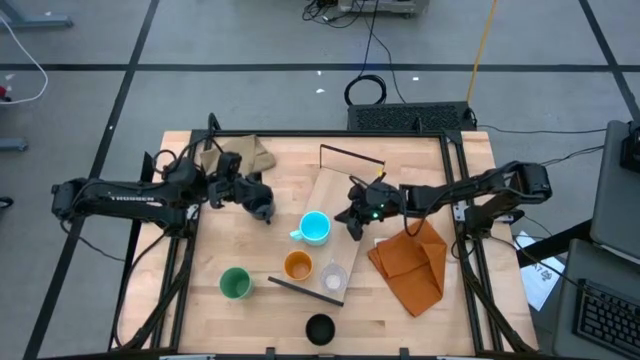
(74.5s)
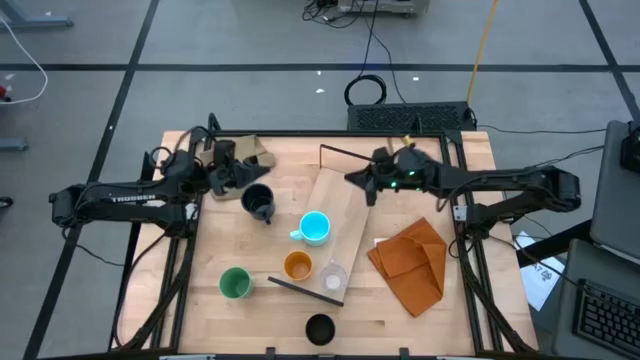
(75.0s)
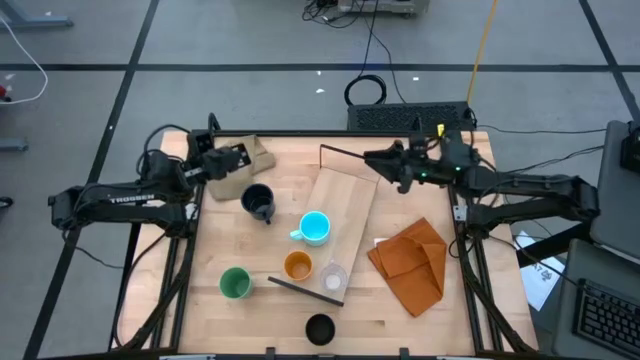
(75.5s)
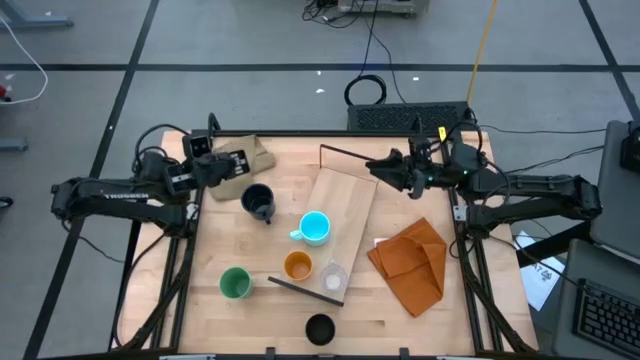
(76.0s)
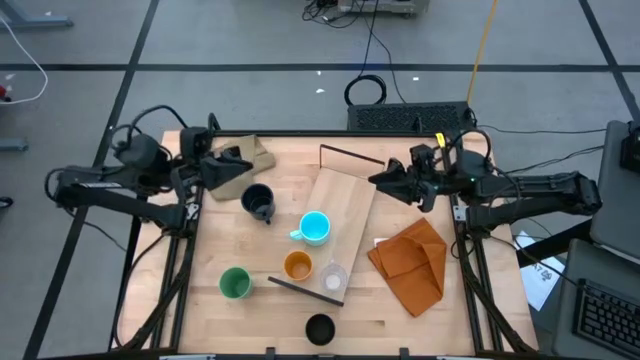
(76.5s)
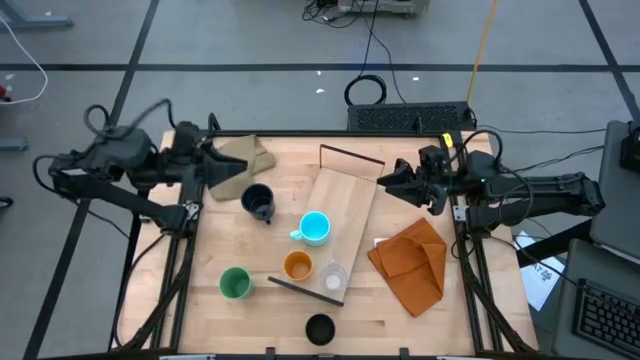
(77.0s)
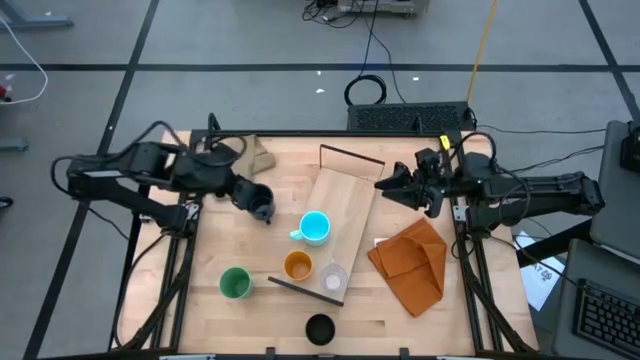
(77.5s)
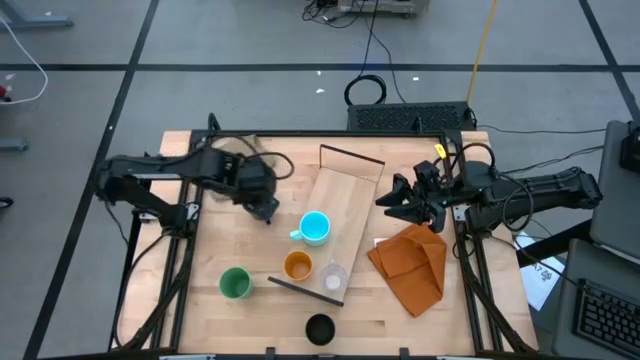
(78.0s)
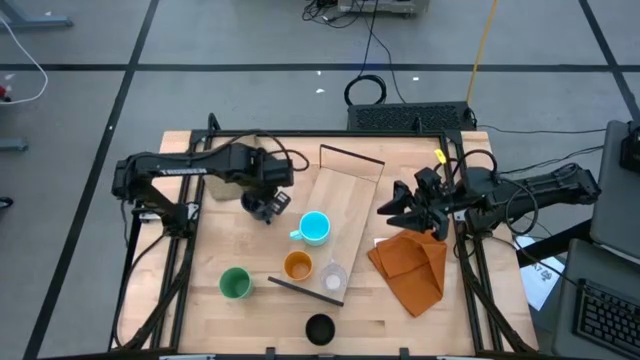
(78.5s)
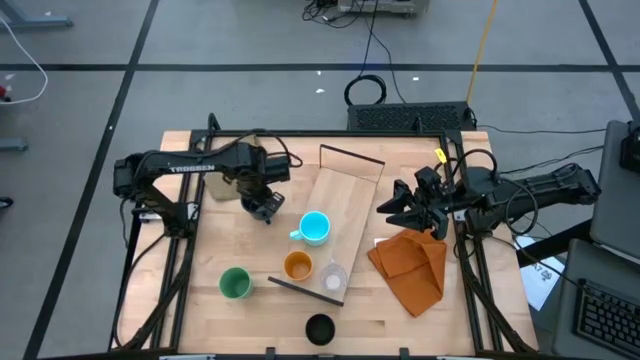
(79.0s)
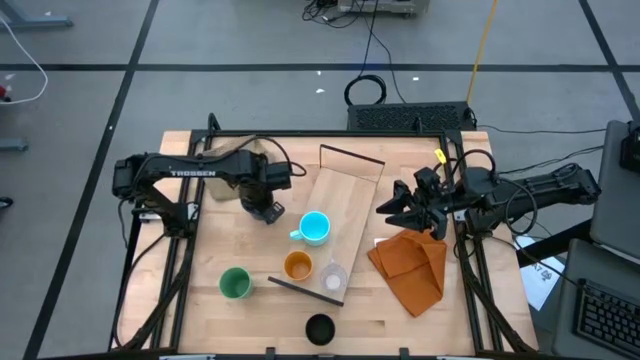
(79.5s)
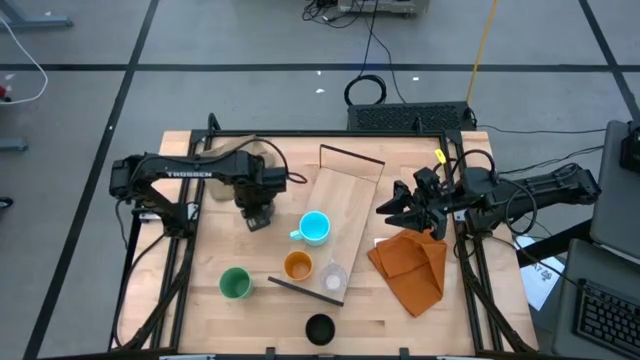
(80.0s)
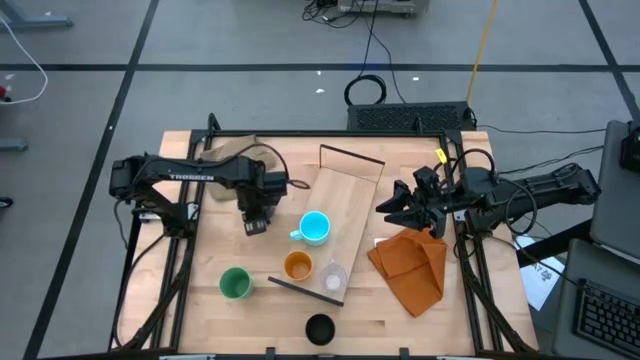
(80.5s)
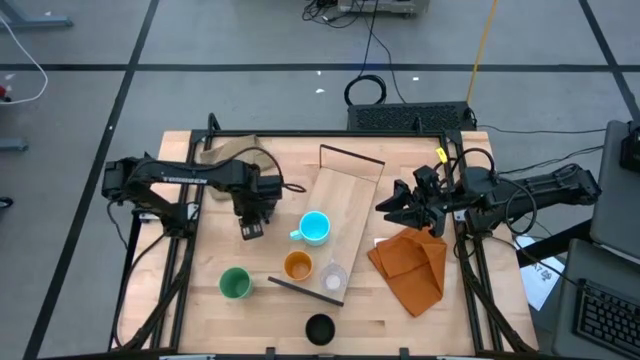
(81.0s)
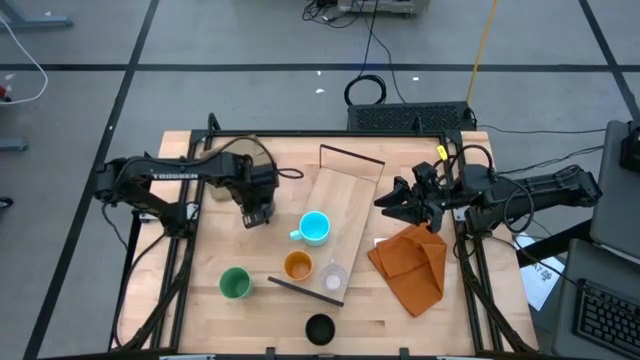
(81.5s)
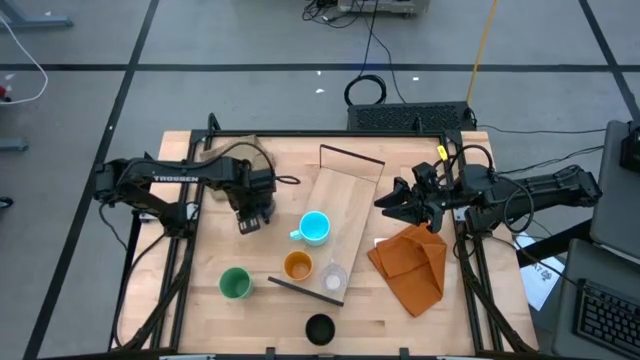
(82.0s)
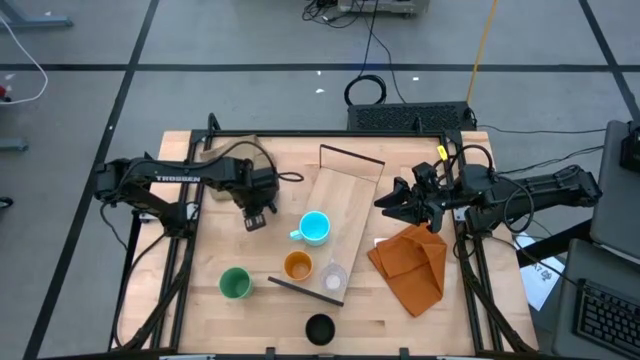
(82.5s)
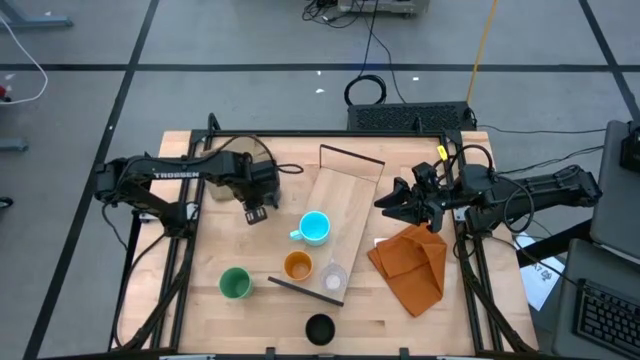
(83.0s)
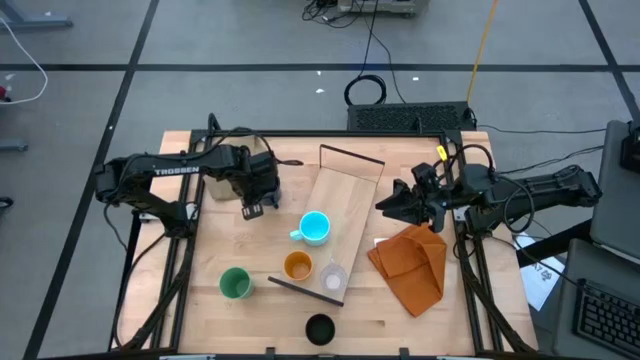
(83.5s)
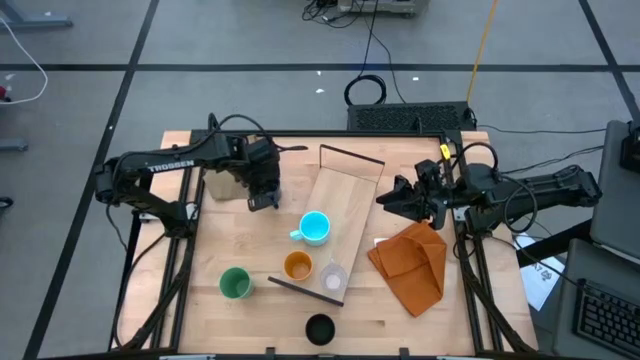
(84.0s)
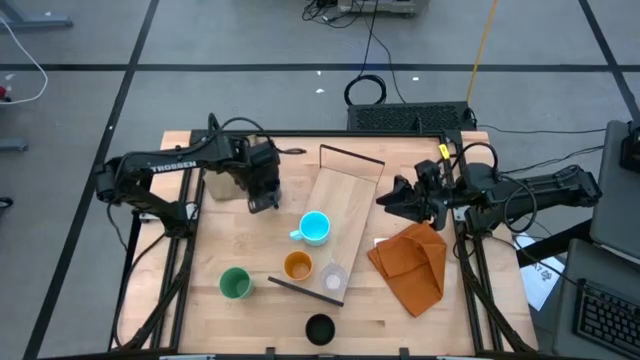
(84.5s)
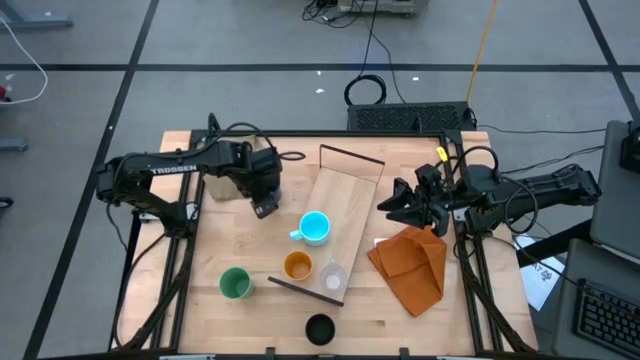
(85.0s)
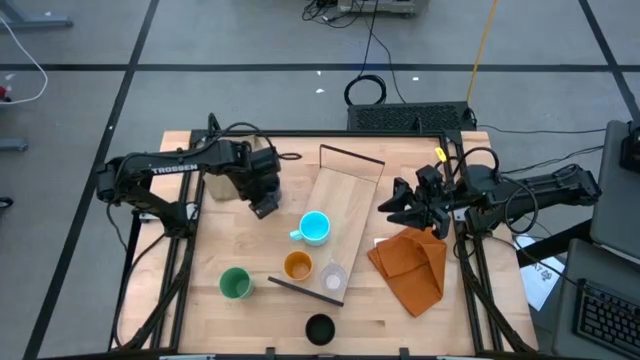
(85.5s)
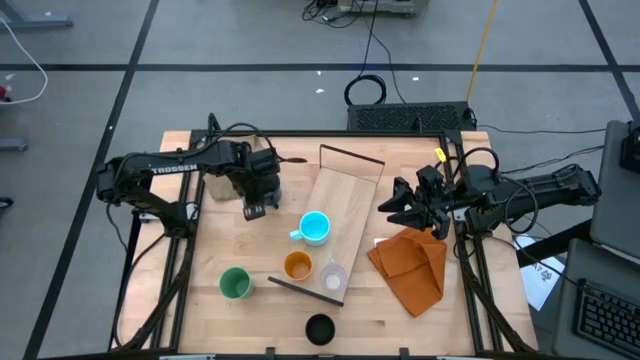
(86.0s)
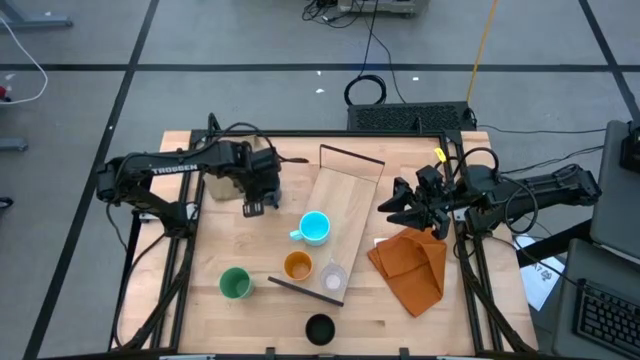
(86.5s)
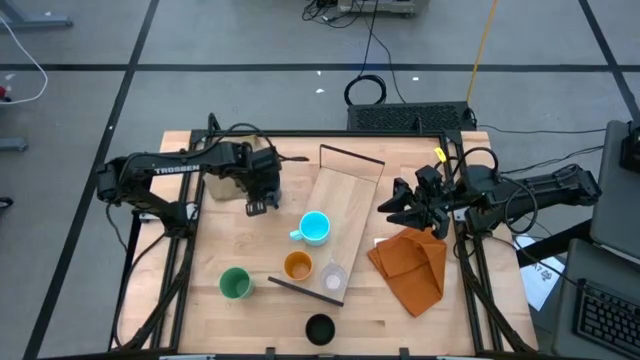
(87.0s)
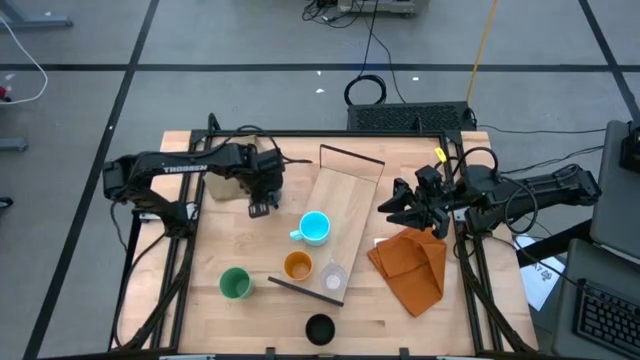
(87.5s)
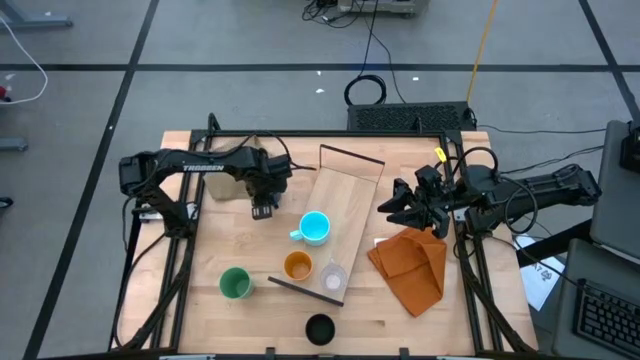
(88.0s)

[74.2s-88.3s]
Task: Stack small to large cups/mugs on shelf
Put the dark blue mug on the shelf

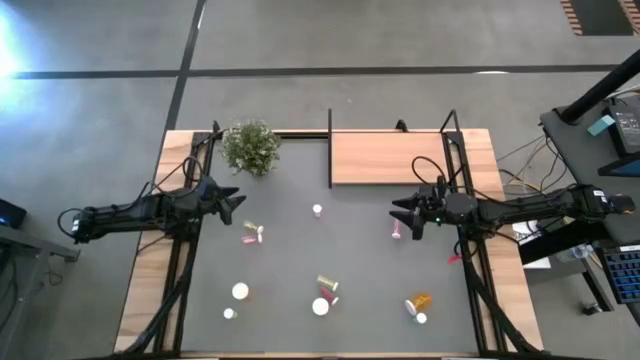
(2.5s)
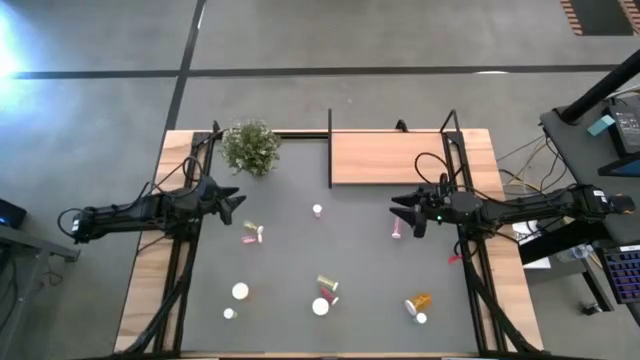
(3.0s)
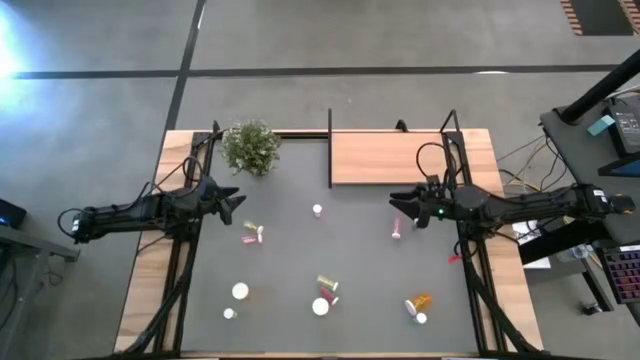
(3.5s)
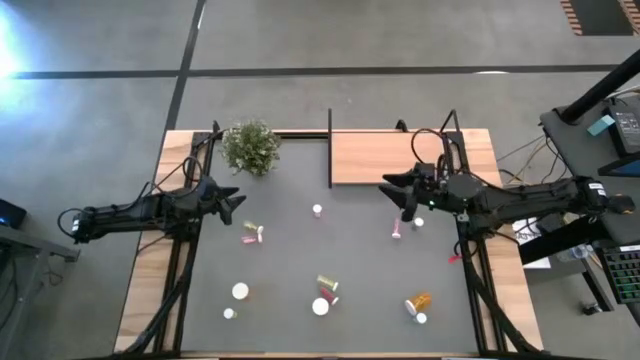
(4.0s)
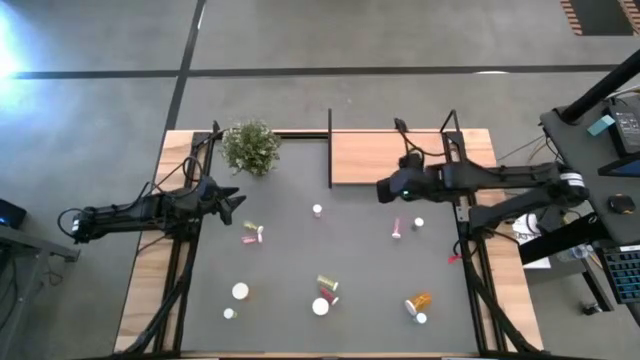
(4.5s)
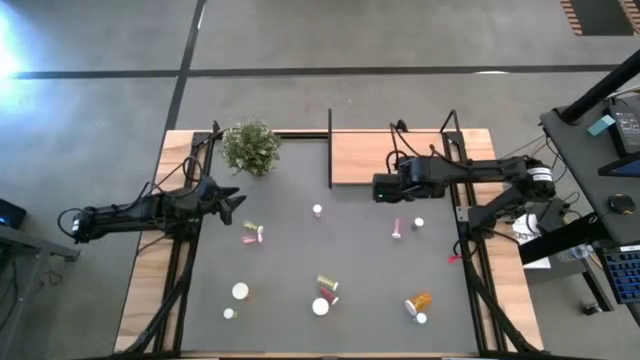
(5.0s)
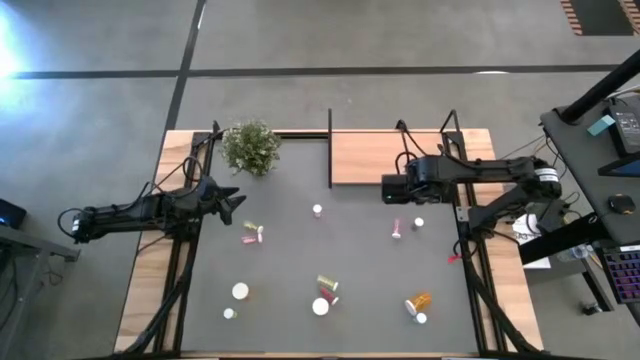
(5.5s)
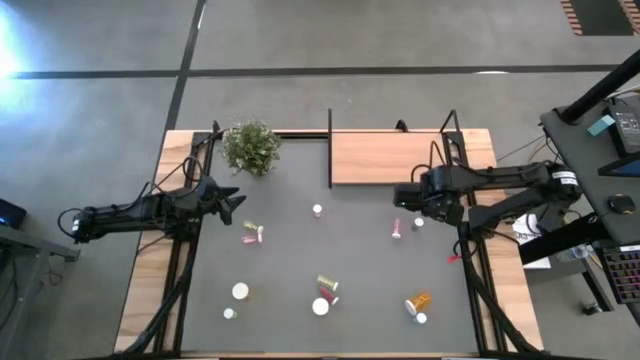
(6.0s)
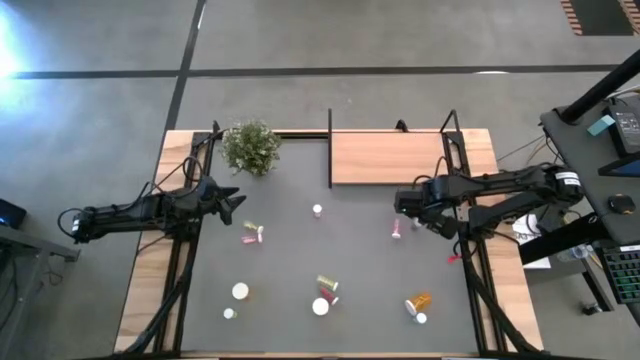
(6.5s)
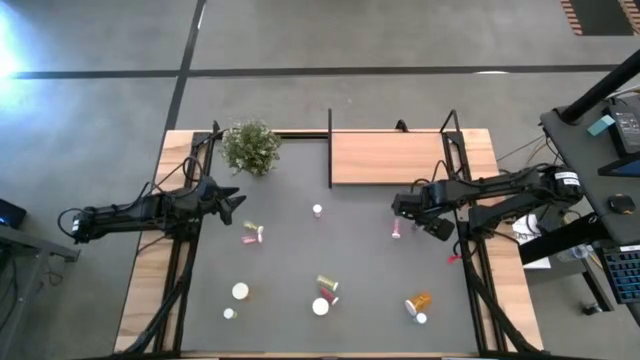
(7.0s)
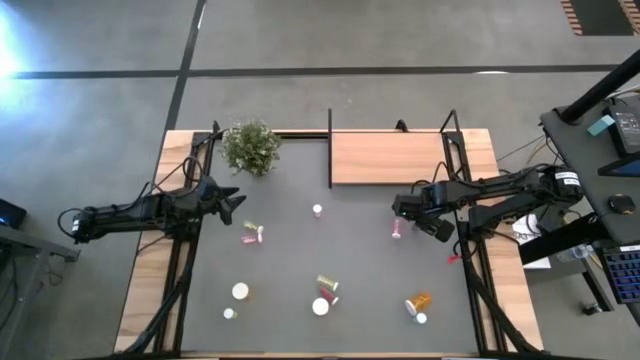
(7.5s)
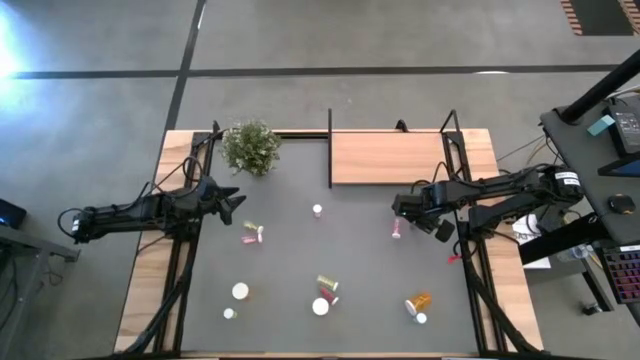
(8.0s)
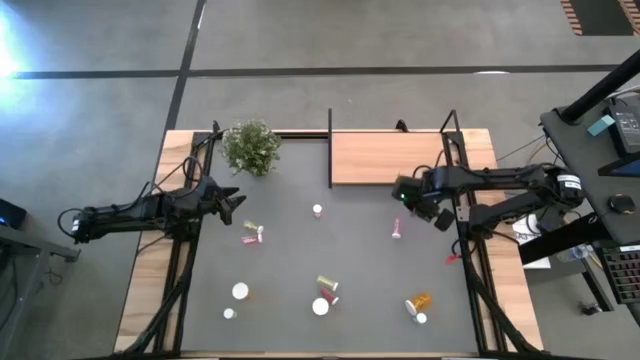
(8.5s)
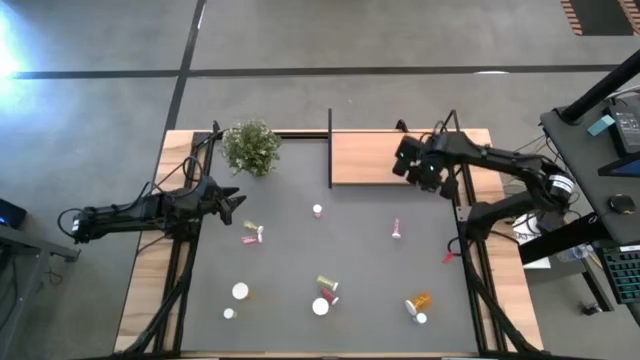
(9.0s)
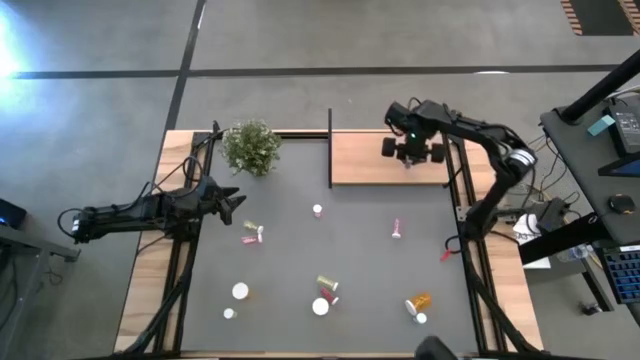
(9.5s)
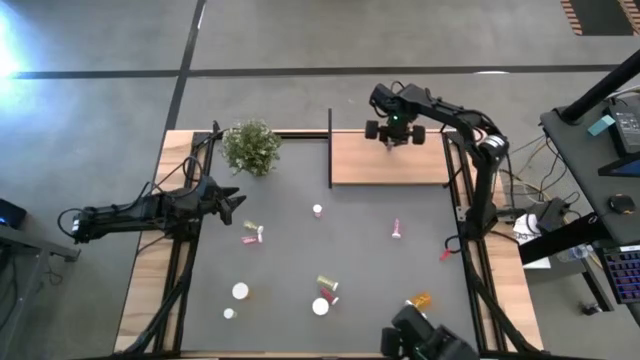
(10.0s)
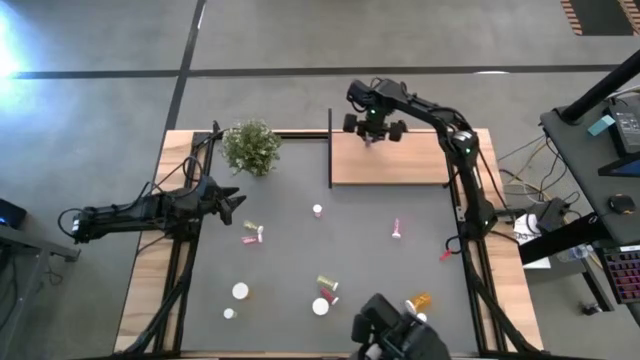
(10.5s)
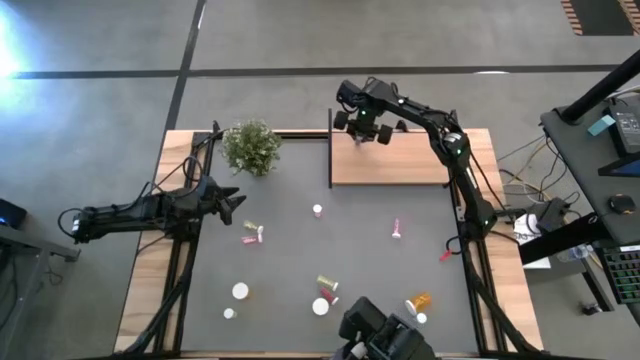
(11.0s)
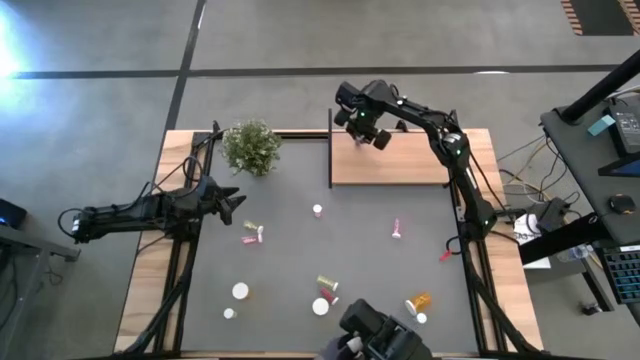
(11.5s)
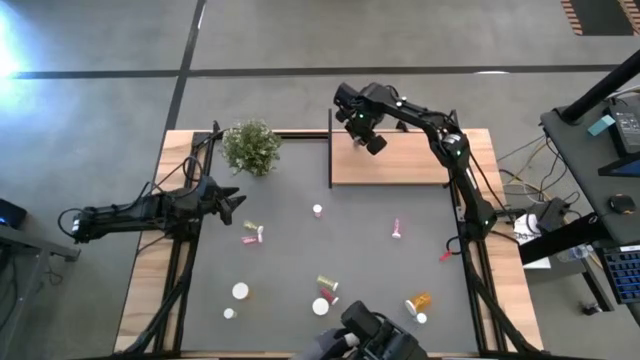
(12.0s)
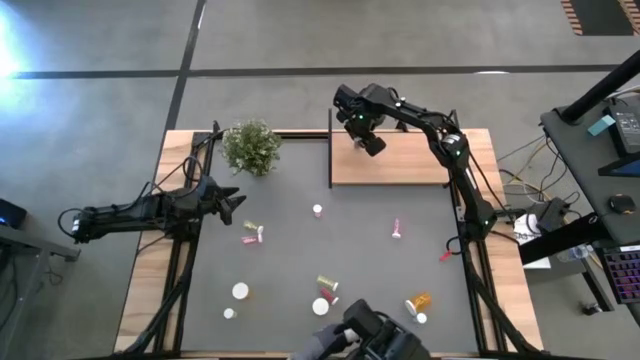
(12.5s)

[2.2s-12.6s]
Task: Pick and place medicine bottles onto shelf by color
Put the top right blue pill bottle on the shelf
